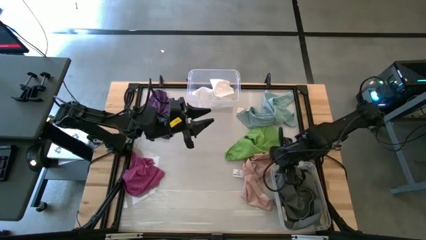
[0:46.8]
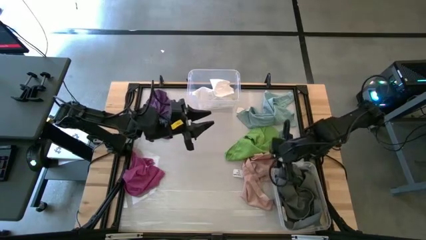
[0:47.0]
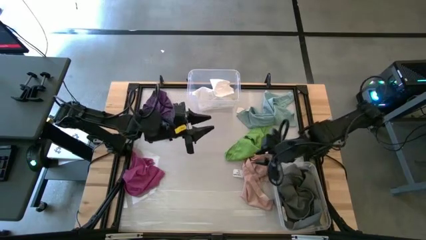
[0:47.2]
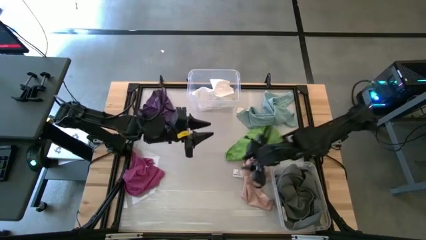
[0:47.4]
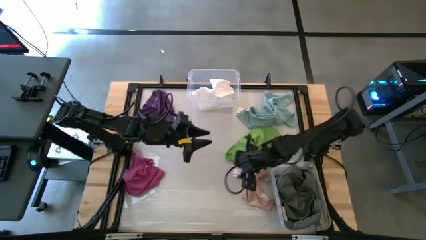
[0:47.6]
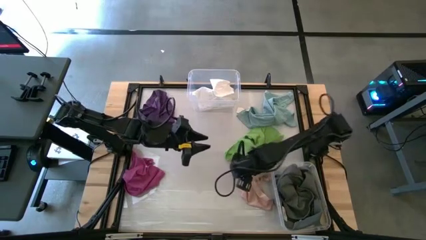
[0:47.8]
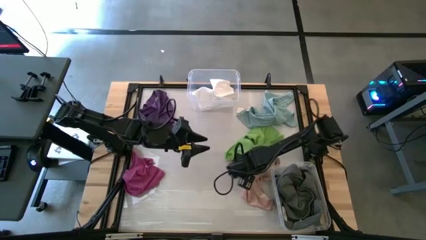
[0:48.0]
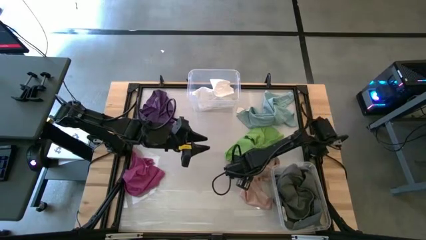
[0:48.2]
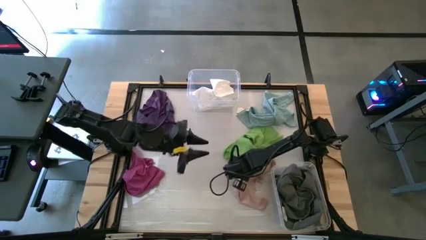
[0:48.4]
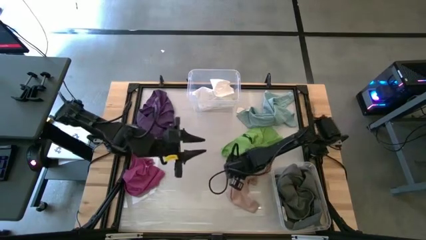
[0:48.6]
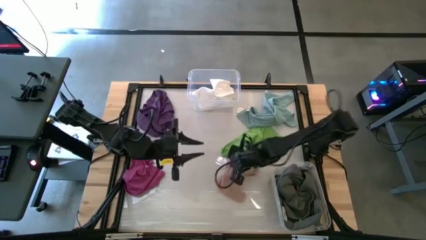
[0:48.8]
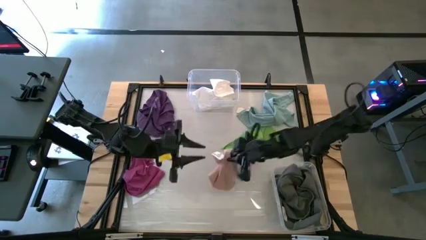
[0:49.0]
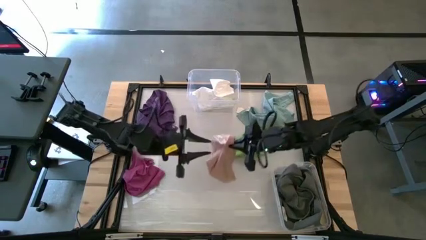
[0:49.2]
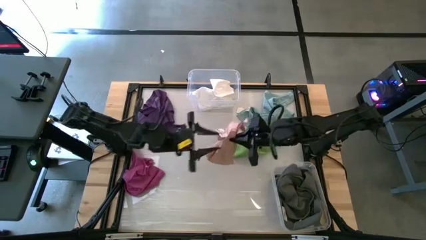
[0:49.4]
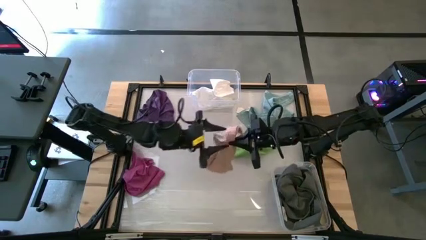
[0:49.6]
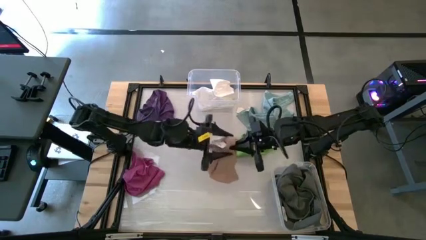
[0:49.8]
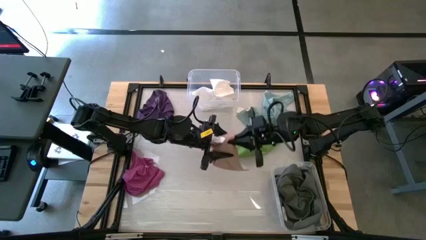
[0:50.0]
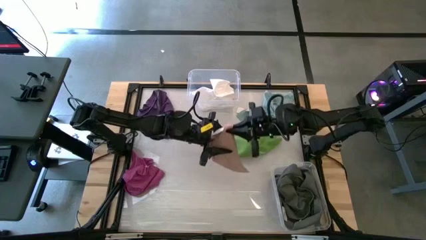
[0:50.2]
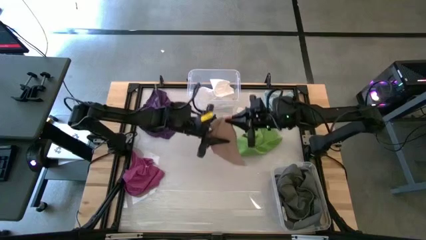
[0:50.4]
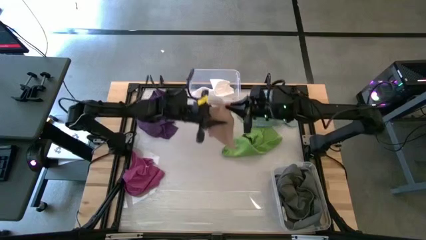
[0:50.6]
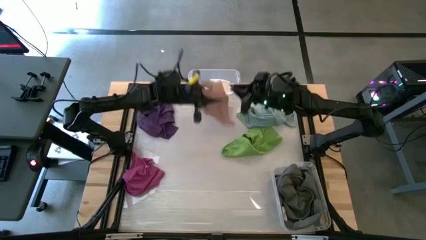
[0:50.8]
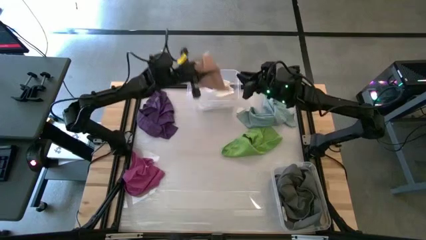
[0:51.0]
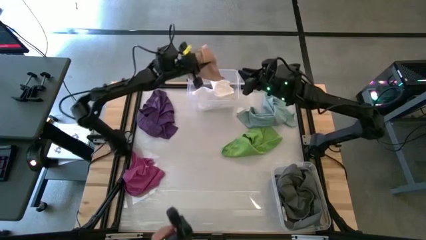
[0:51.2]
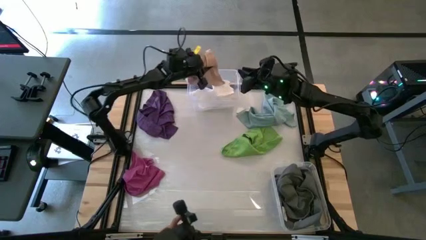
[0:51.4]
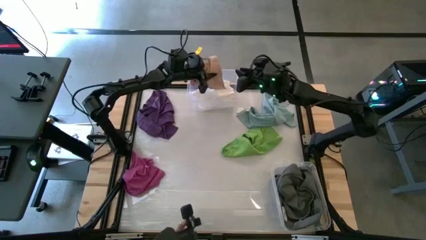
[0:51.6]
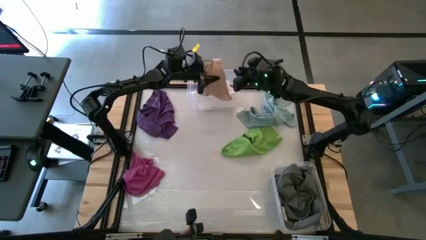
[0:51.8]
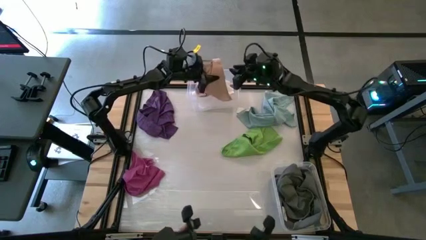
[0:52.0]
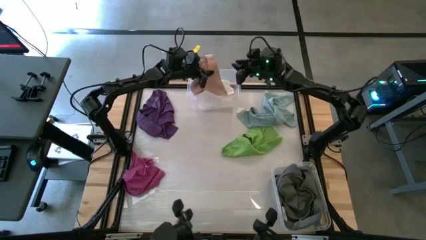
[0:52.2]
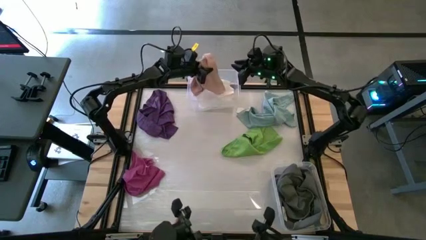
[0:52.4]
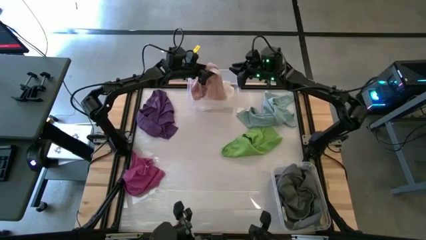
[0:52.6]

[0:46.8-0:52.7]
Task: Sort towels by color in basket
Put the light brown towel into the top transparent bin

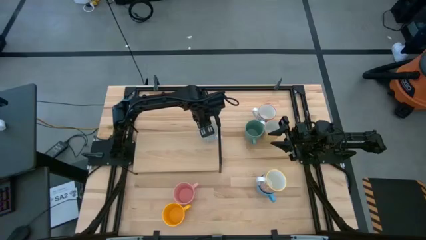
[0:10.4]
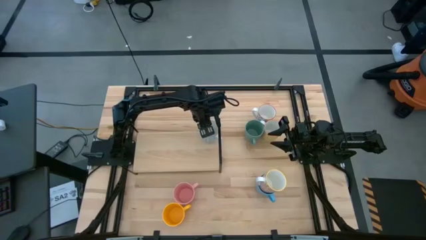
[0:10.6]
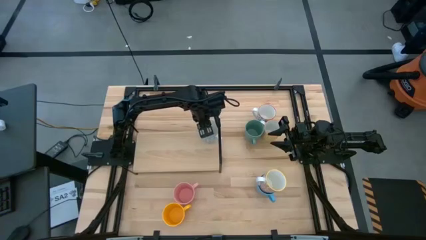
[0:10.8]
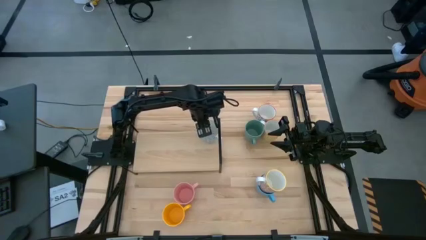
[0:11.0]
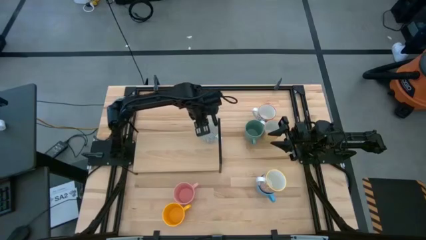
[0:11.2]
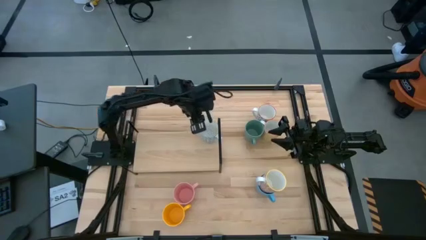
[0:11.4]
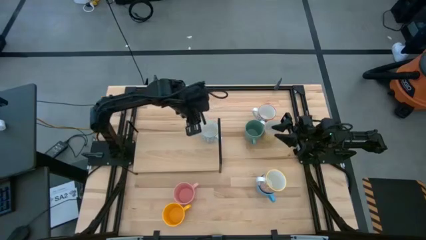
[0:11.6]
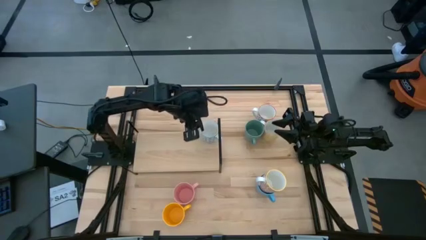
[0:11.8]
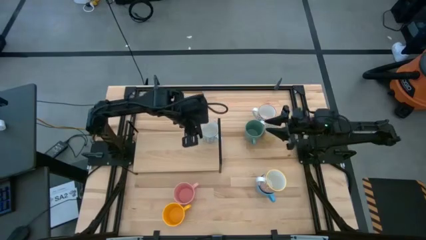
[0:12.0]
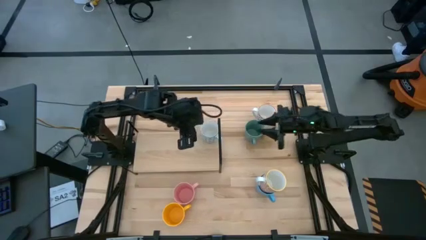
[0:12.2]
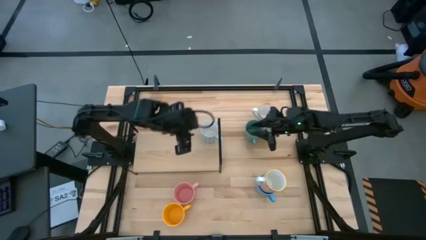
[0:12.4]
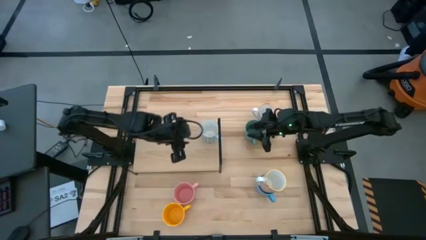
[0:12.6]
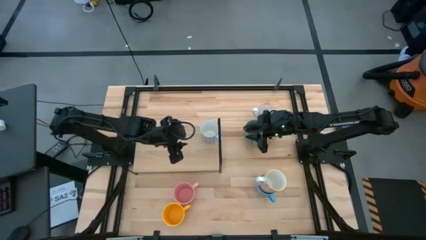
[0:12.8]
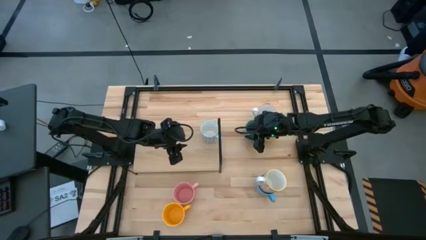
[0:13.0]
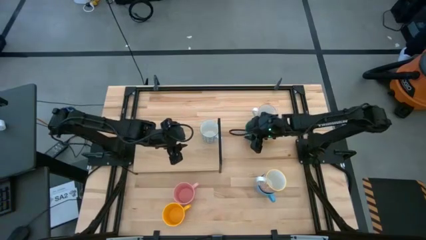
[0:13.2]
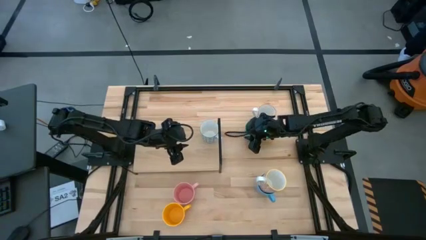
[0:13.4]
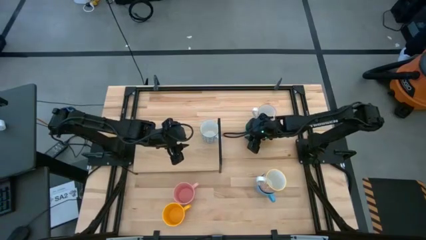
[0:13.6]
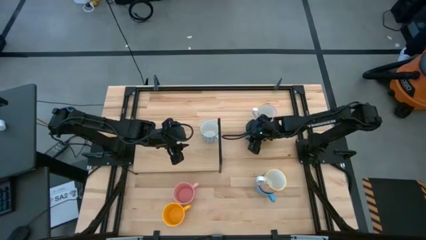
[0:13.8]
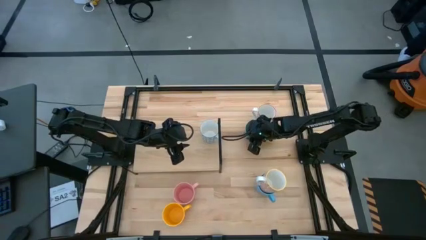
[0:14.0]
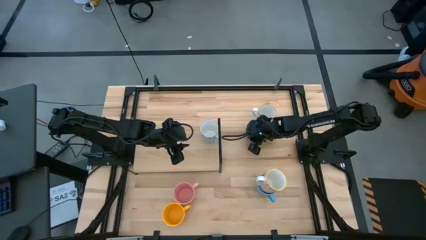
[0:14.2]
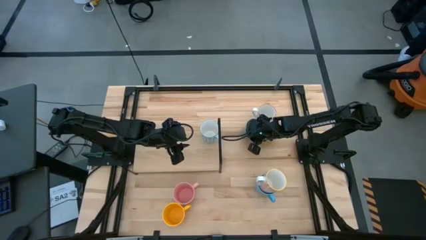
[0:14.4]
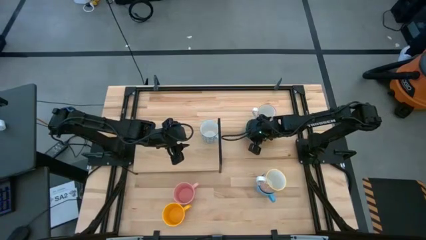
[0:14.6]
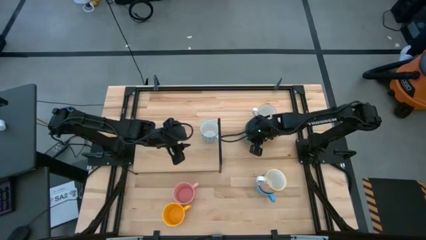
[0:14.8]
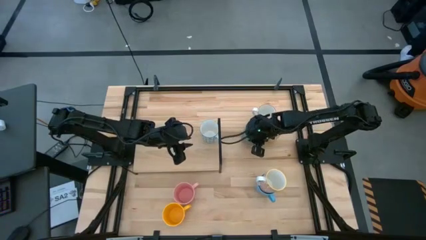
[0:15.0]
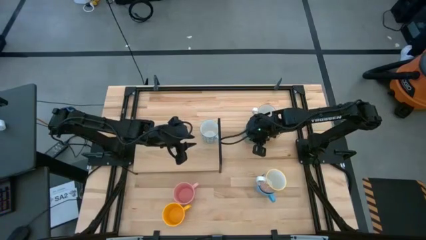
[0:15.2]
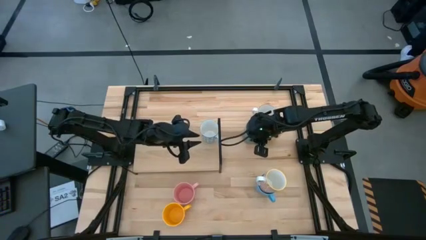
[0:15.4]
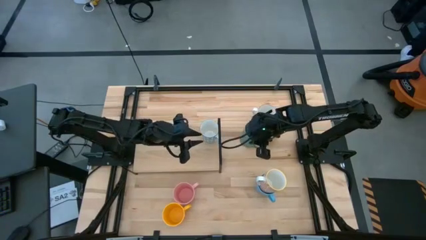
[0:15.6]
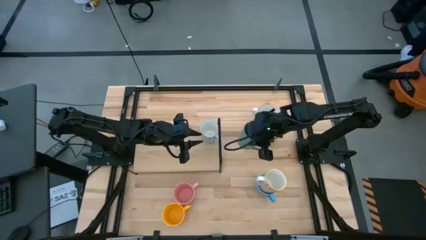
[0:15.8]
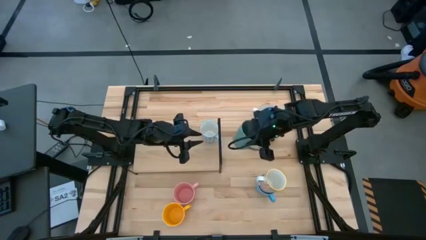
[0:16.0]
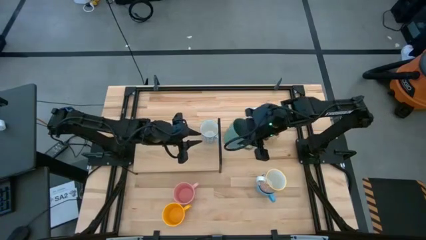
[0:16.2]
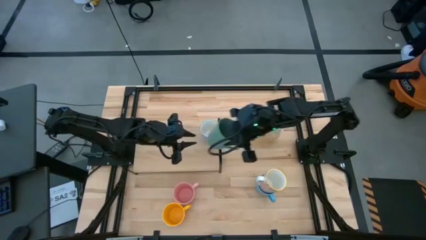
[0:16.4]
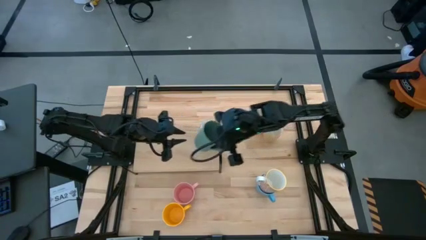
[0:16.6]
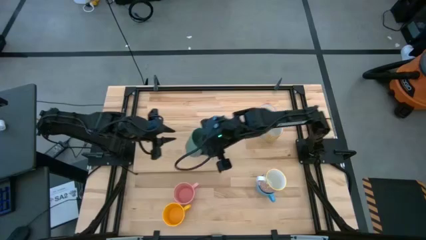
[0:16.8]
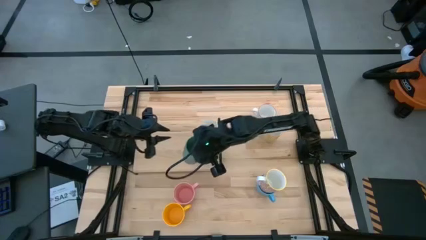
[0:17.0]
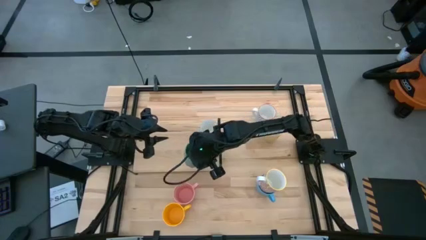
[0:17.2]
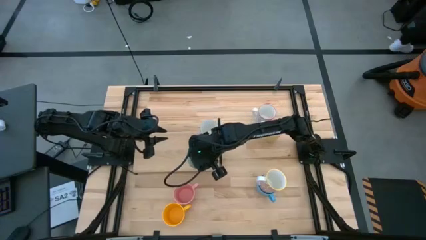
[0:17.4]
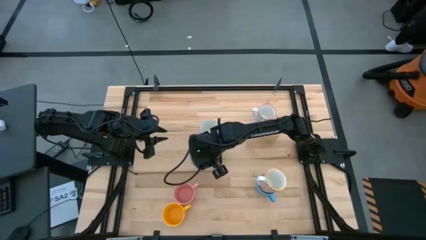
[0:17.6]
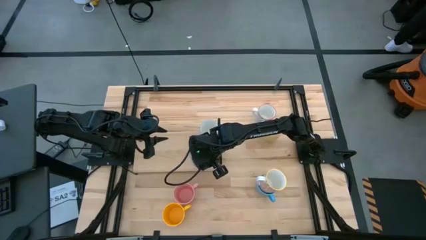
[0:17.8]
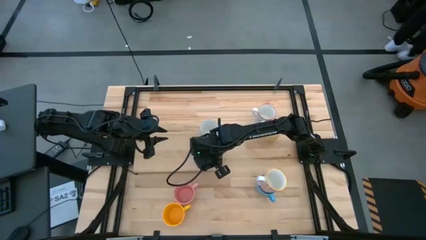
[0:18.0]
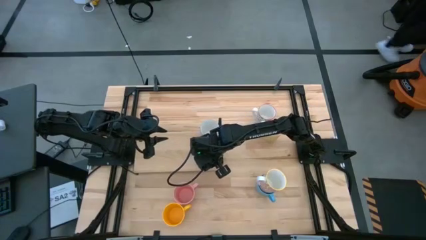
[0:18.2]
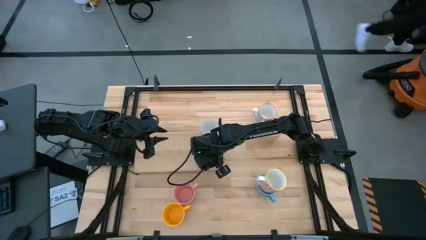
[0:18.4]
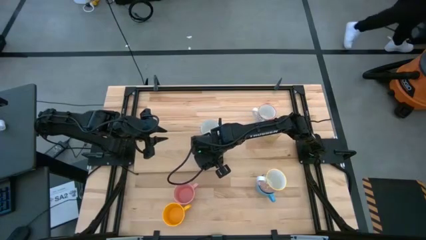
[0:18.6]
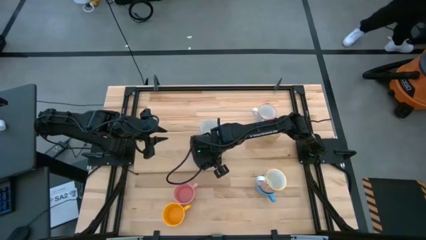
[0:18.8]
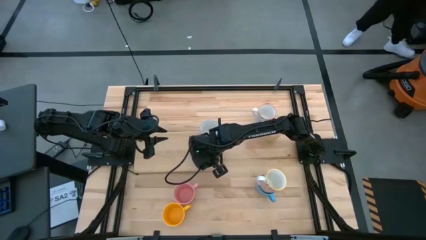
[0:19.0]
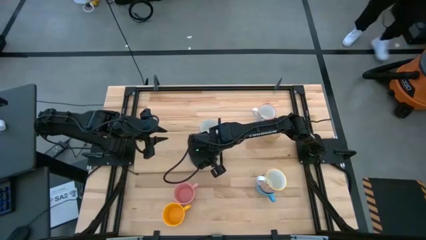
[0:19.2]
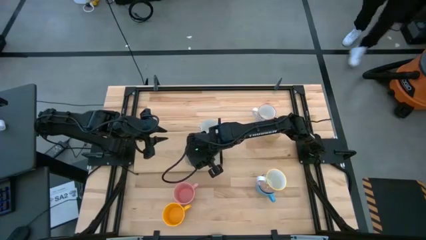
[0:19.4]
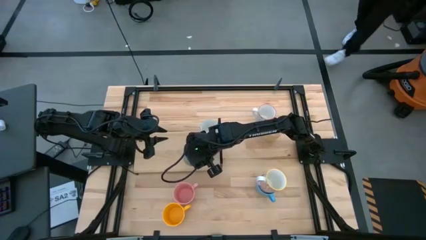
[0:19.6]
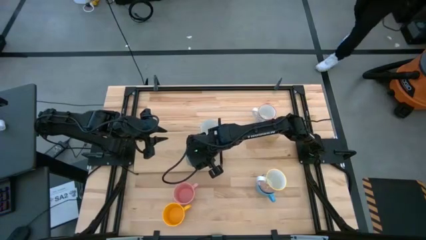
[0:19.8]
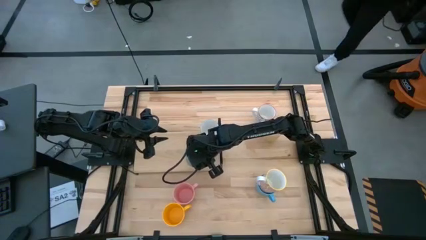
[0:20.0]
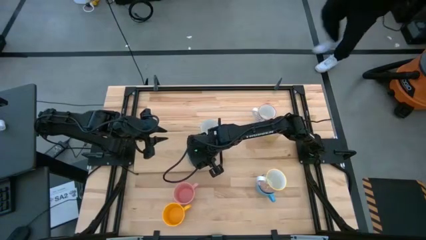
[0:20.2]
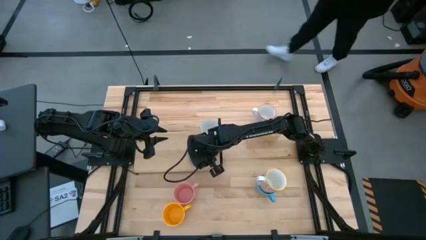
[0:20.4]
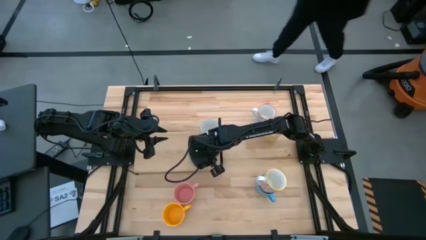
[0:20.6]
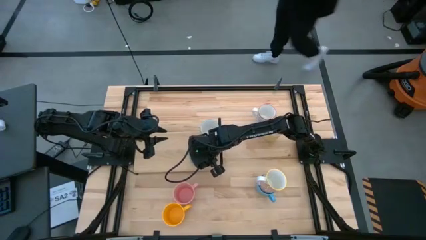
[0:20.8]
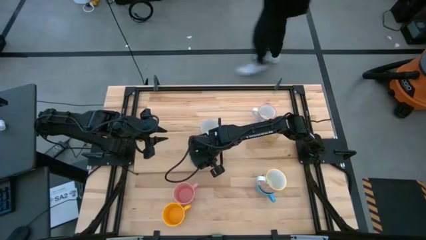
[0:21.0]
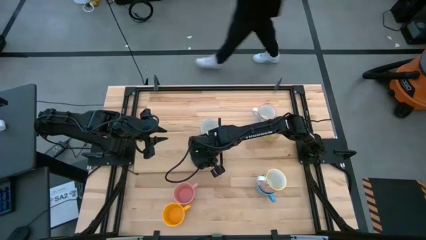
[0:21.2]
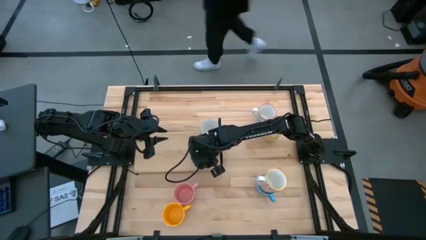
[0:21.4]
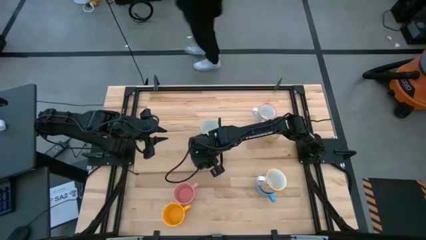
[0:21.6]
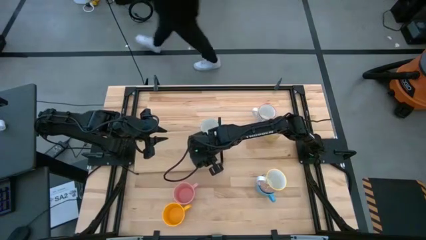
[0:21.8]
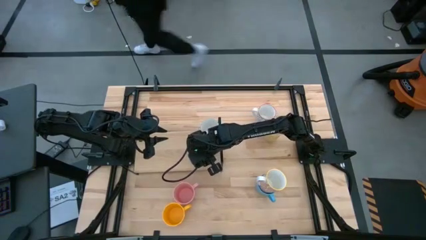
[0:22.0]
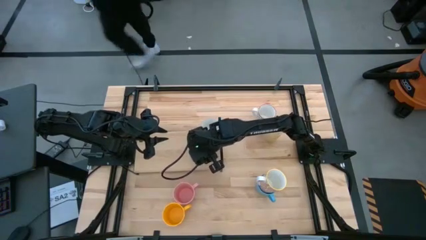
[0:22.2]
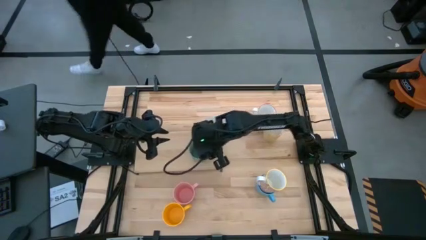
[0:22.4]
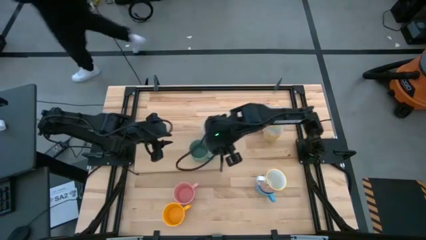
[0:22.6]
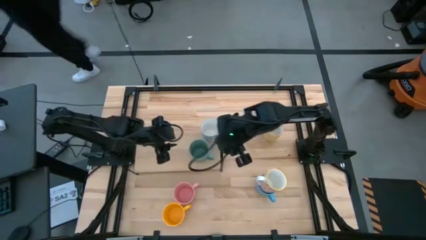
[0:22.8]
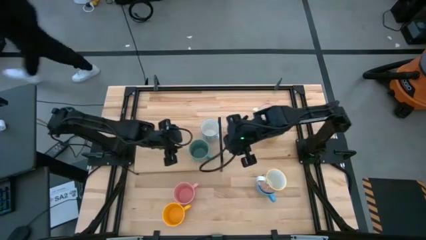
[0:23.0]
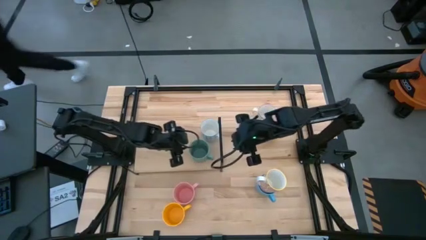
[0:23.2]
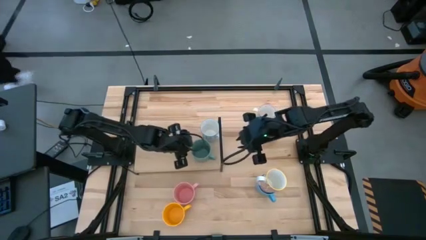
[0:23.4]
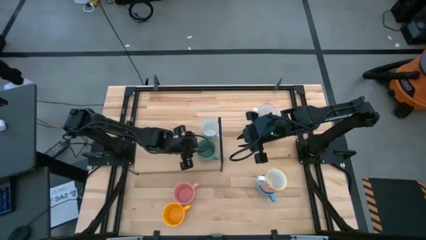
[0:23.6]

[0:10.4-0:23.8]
Task: Place coffee mugs
Put the green mug on the shelf
